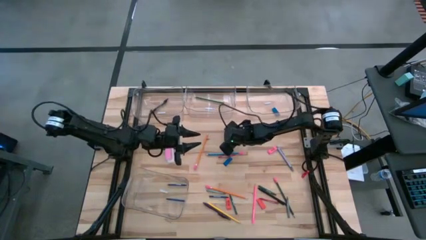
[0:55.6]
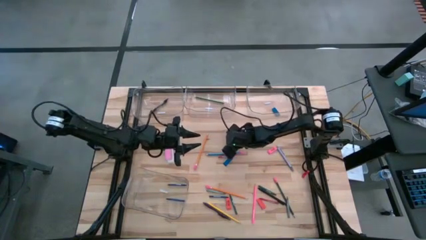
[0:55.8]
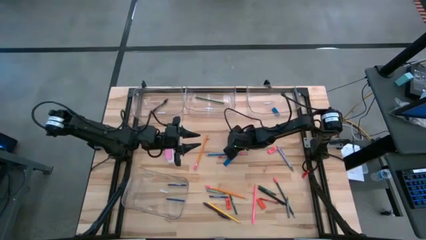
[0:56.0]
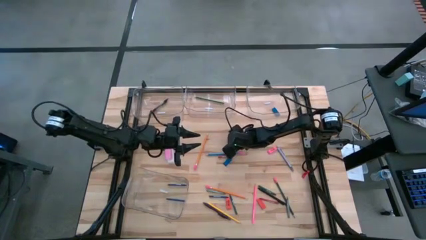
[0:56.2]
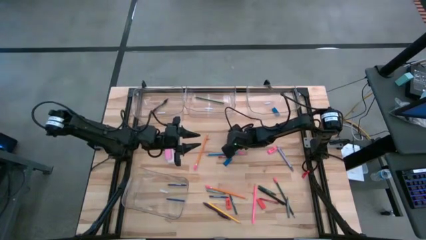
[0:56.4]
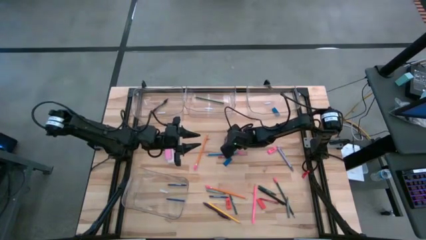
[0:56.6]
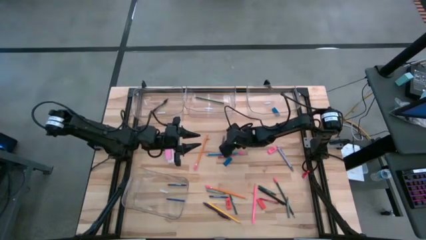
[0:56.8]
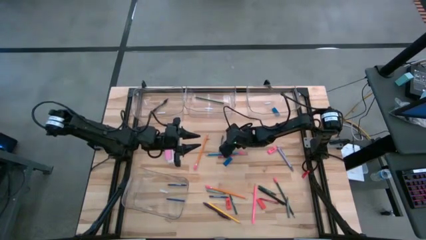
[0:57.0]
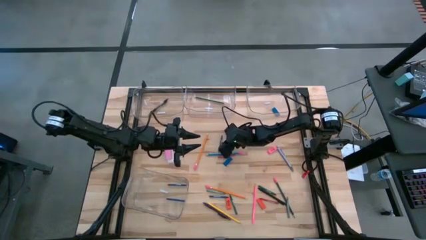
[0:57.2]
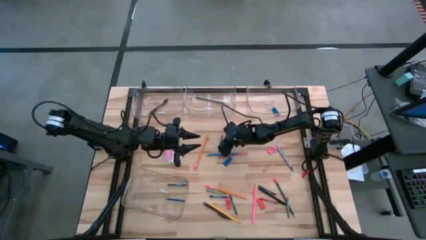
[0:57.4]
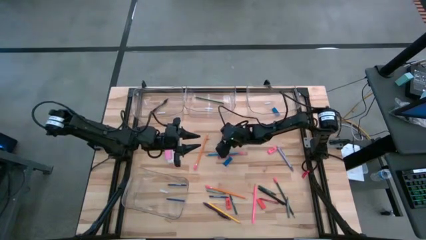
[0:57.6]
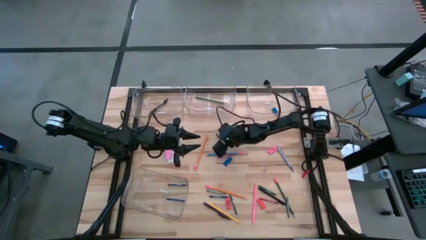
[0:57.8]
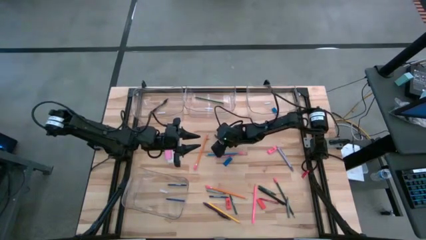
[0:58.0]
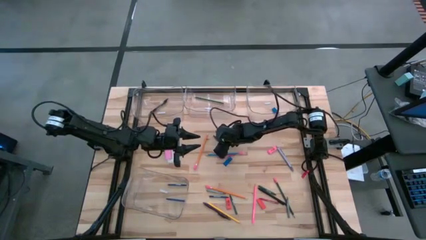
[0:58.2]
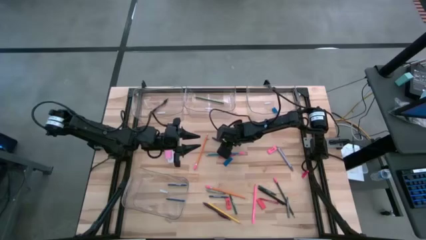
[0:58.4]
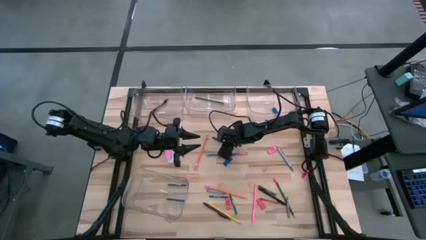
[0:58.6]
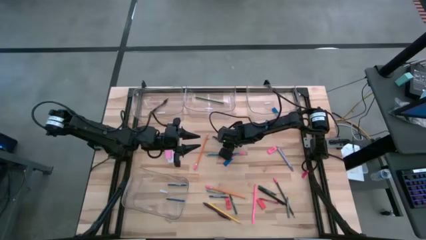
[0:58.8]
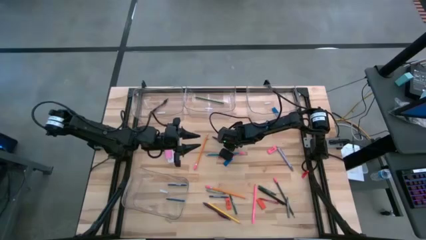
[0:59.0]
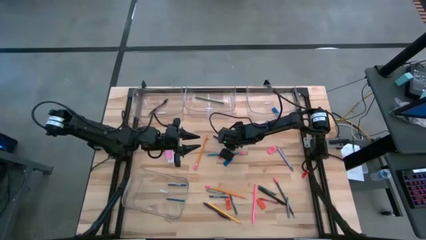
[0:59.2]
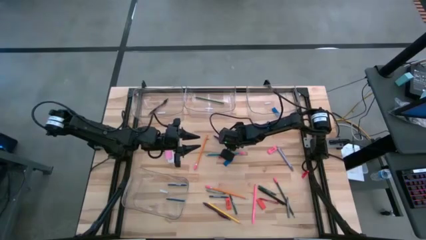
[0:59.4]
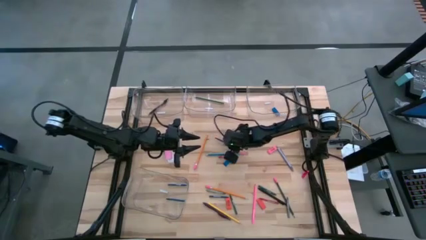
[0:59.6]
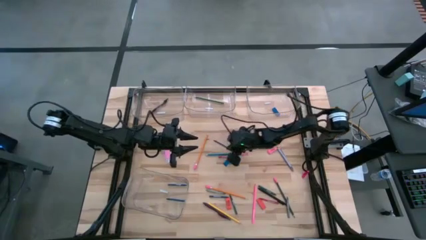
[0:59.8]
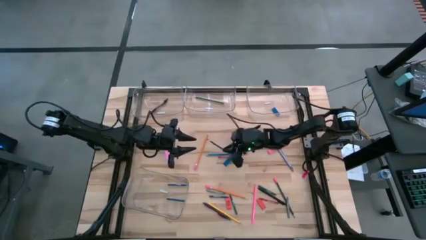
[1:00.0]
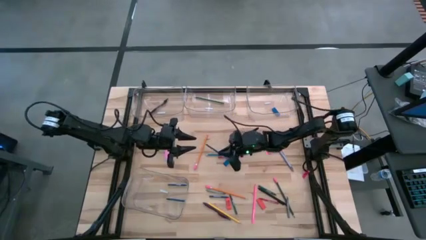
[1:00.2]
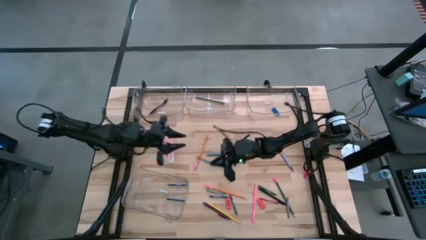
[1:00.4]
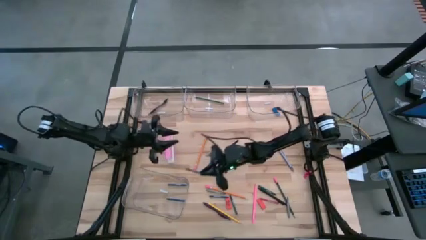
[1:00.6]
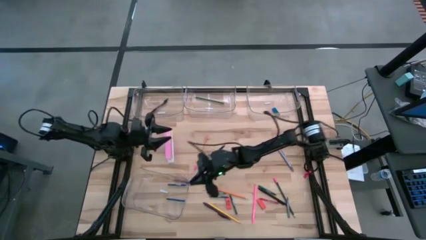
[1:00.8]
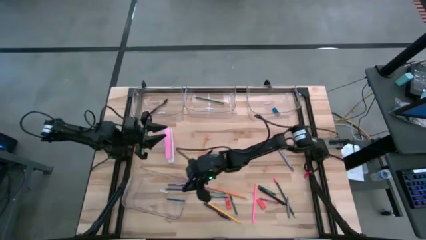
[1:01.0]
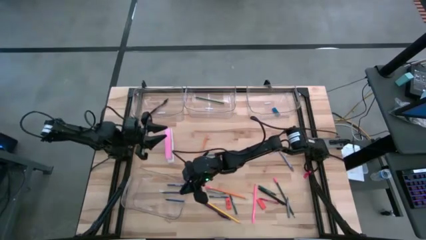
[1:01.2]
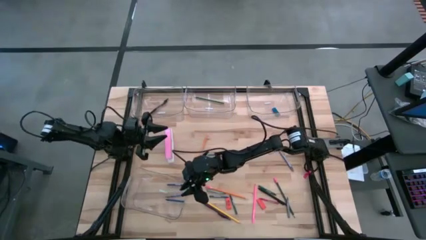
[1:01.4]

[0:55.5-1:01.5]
Task: Sort crayons/erasers/pens/pencils in bins
Put the blue crayon into the bottom left transparent bin

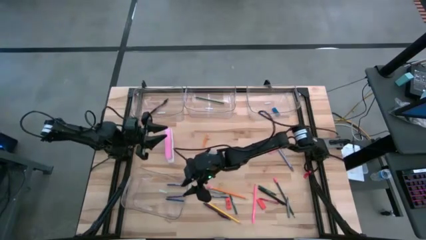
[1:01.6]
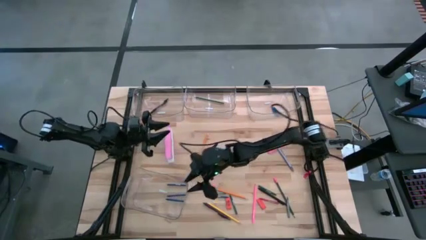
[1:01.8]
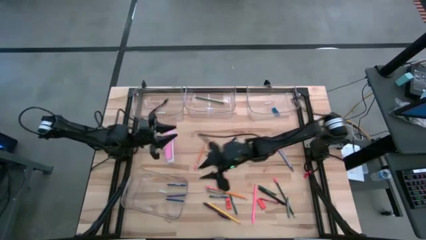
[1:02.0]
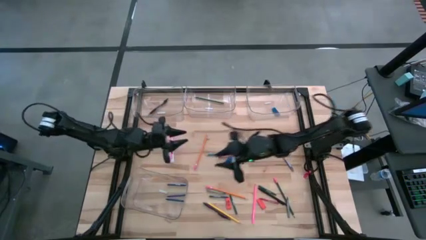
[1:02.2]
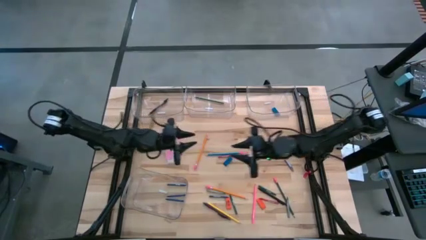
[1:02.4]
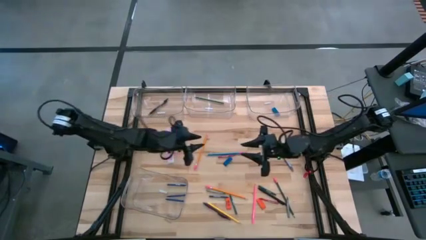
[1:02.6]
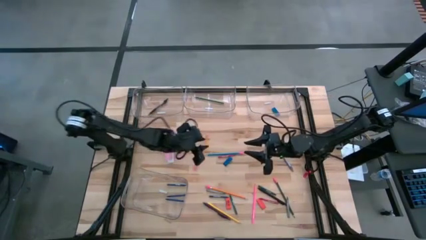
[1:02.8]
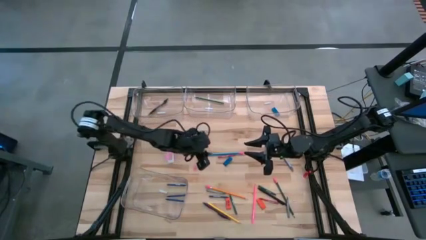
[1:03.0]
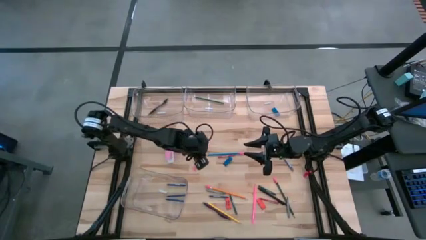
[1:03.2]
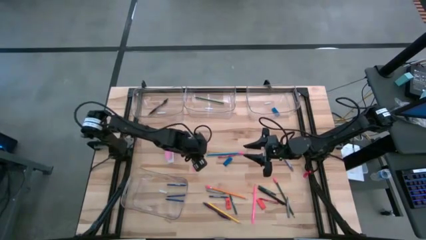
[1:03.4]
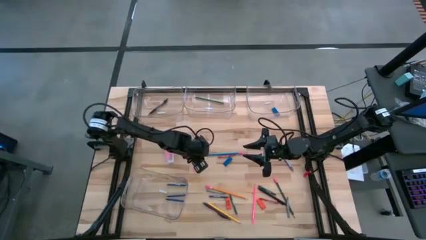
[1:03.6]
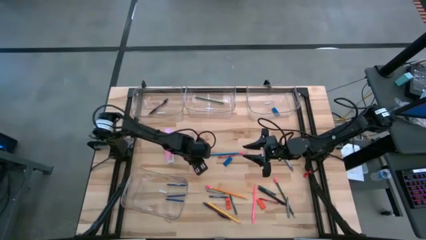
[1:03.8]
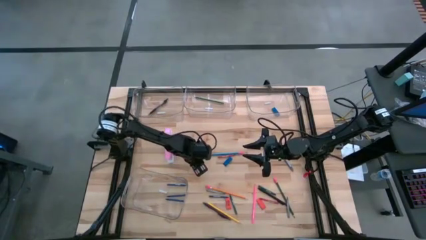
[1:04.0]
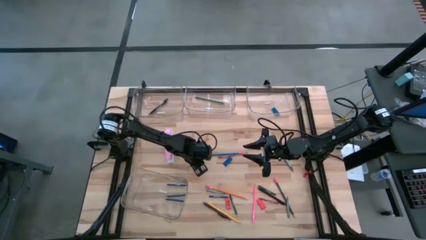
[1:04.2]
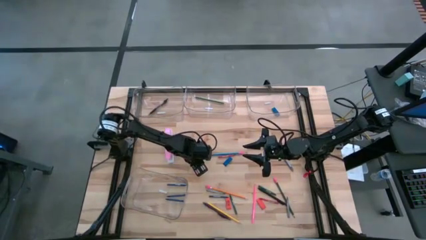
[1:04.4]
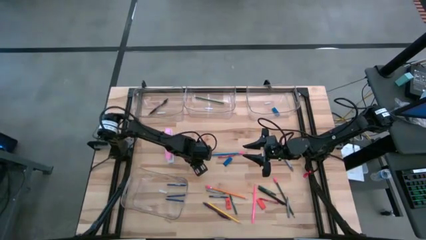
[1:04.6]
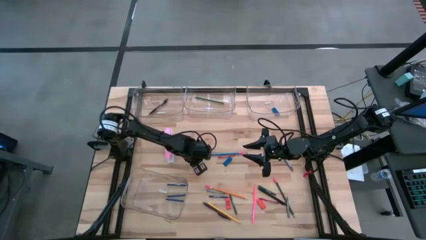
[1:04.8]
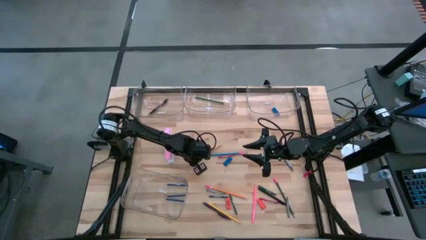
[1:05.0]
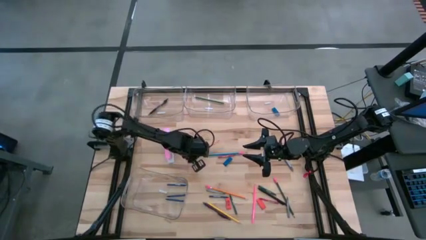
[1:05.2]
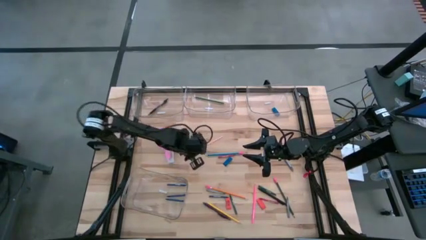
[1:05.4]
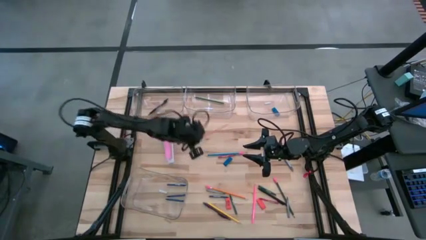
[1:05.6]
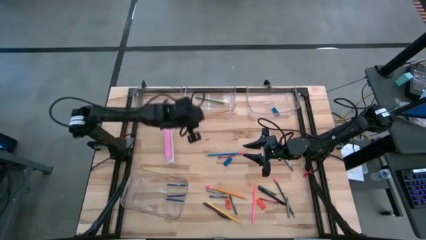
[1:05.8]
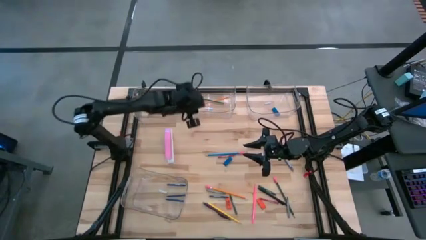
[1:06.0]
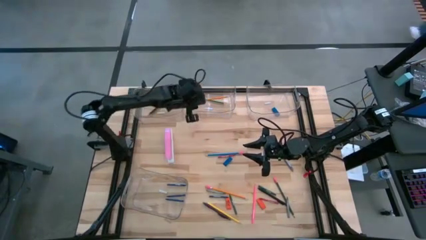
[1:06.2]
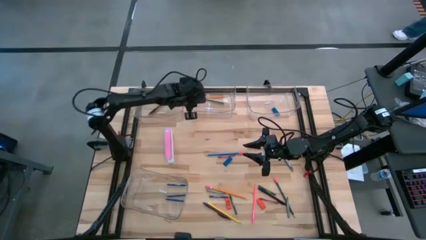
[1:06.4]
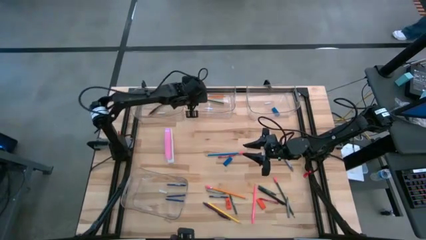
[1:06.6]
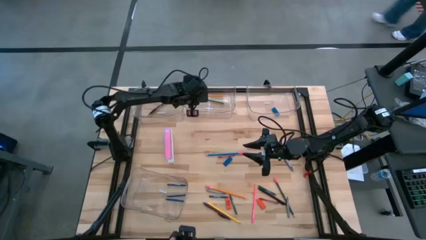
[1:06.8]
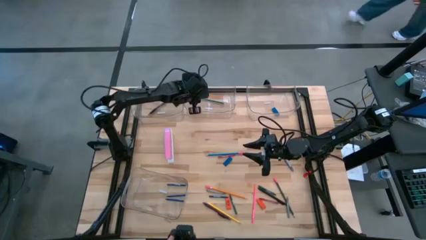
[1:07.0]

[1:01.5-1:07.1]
Put the orange pencil into the top middle transparent bin
